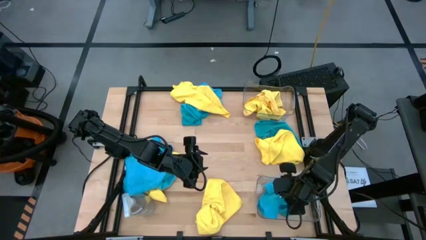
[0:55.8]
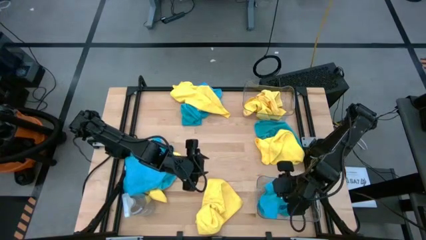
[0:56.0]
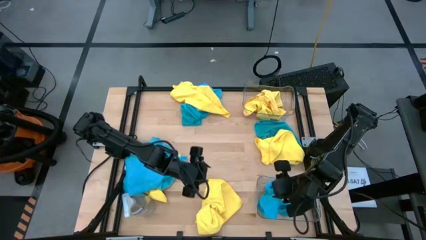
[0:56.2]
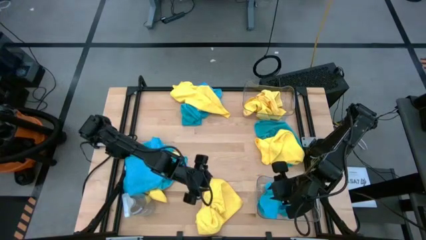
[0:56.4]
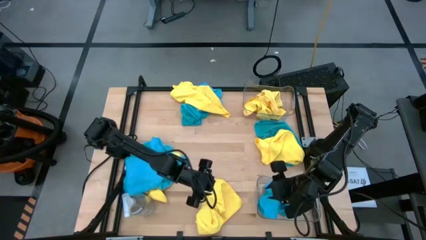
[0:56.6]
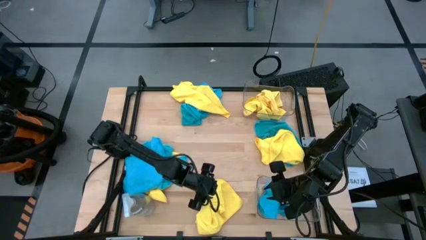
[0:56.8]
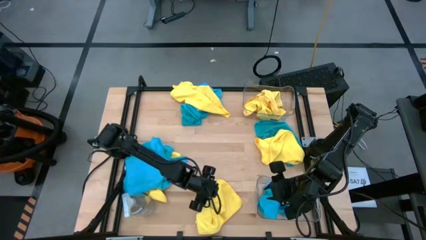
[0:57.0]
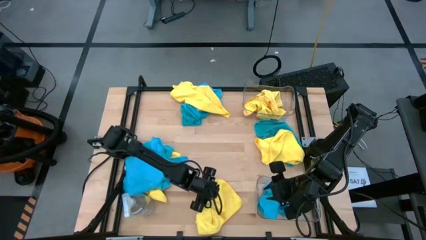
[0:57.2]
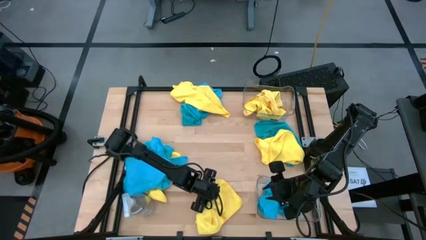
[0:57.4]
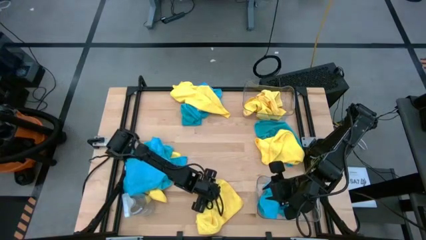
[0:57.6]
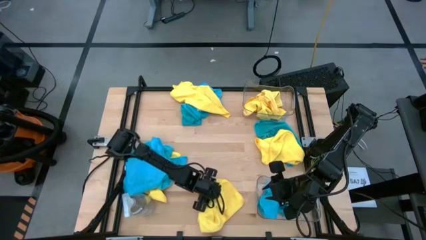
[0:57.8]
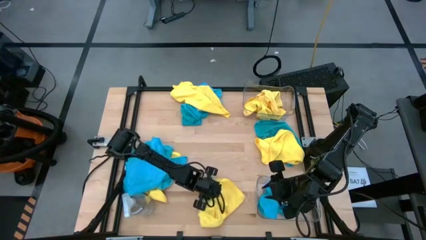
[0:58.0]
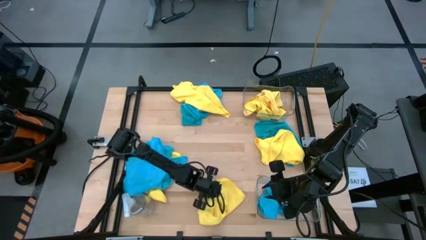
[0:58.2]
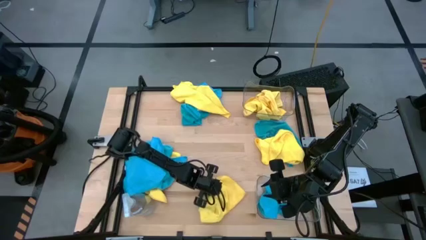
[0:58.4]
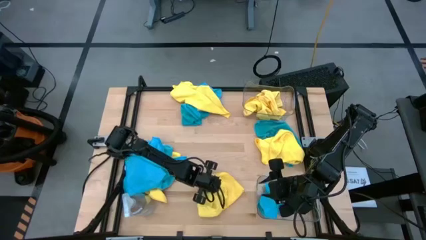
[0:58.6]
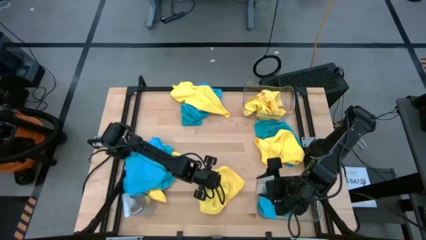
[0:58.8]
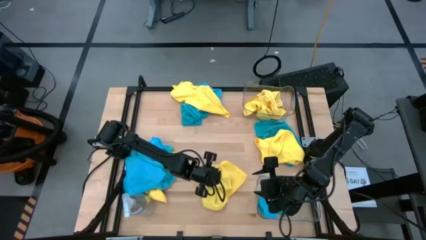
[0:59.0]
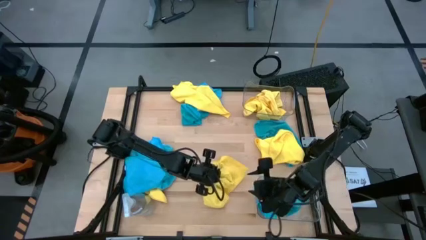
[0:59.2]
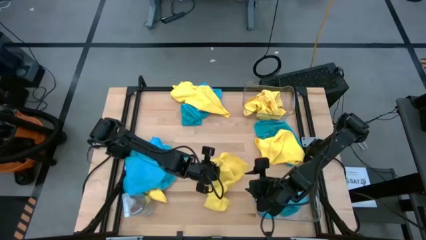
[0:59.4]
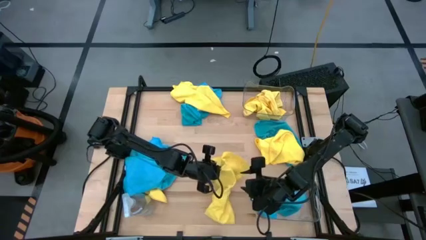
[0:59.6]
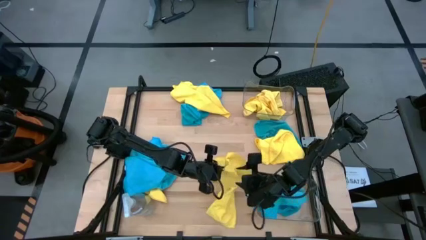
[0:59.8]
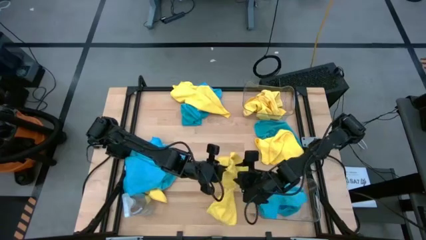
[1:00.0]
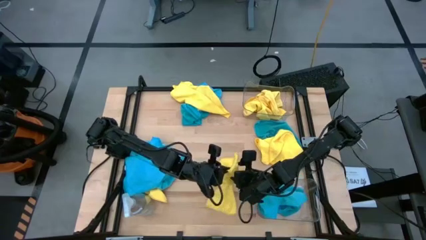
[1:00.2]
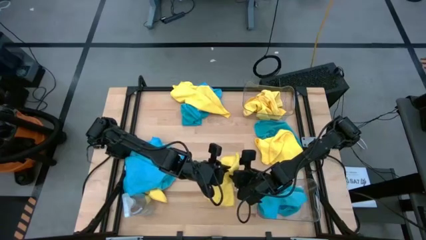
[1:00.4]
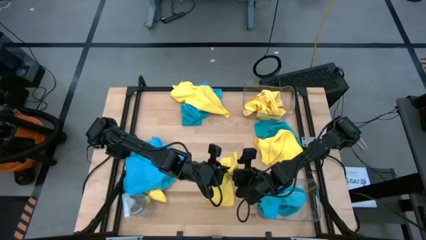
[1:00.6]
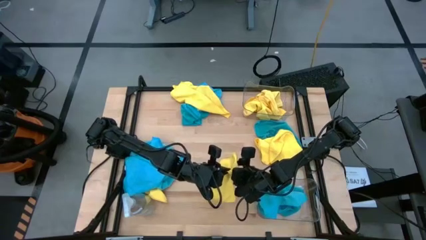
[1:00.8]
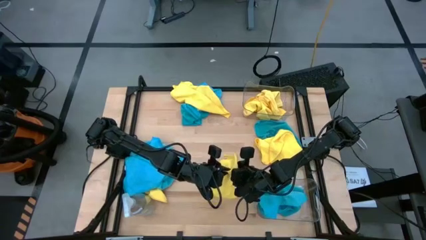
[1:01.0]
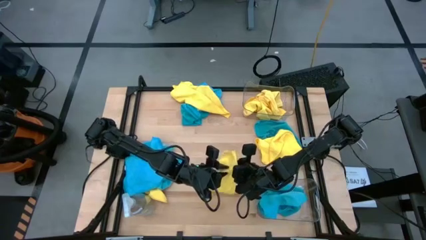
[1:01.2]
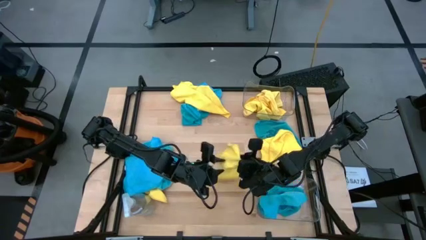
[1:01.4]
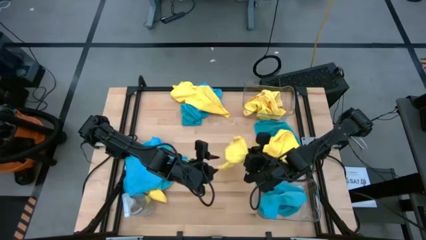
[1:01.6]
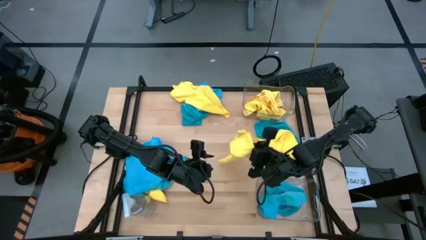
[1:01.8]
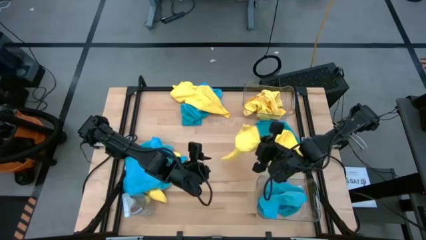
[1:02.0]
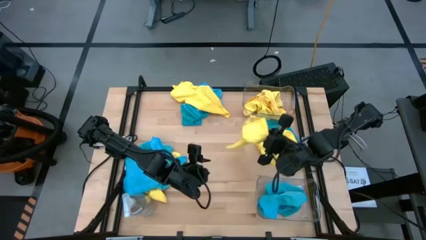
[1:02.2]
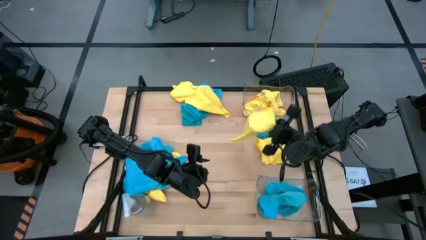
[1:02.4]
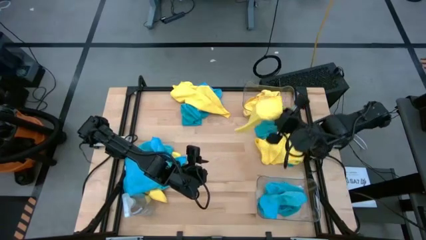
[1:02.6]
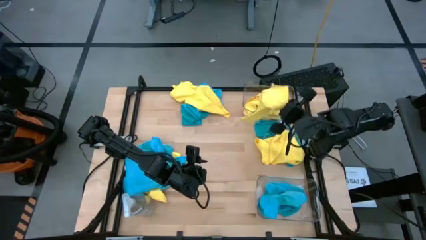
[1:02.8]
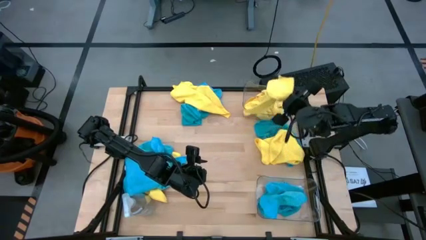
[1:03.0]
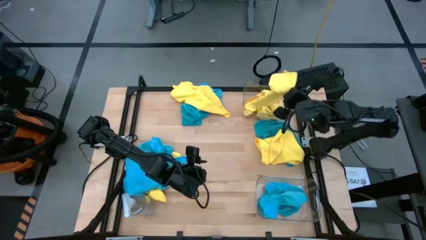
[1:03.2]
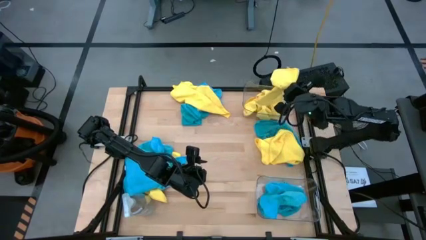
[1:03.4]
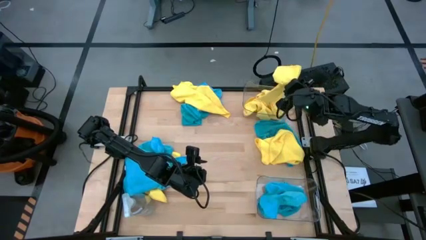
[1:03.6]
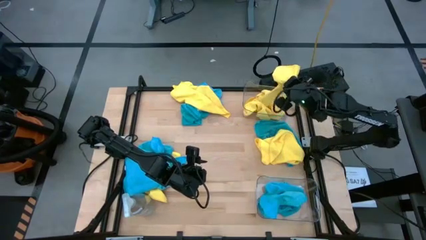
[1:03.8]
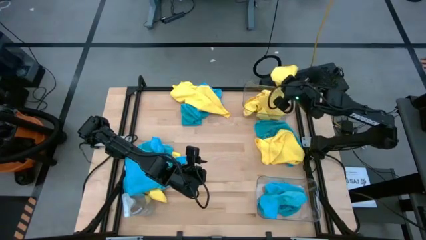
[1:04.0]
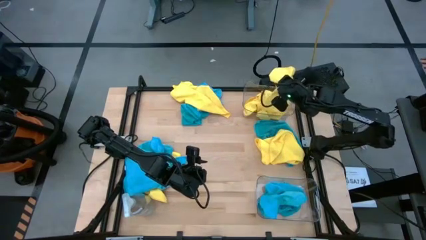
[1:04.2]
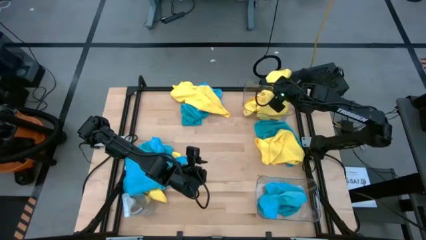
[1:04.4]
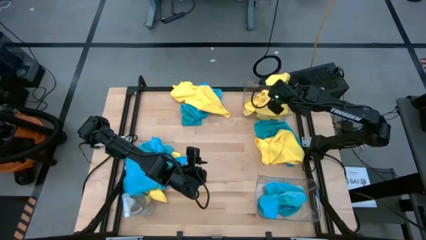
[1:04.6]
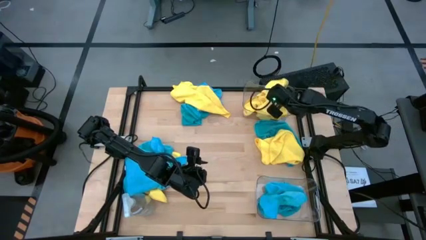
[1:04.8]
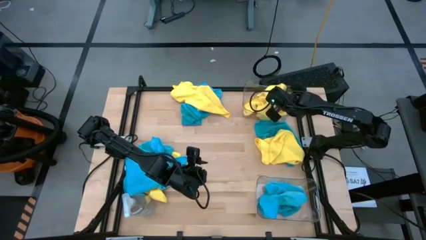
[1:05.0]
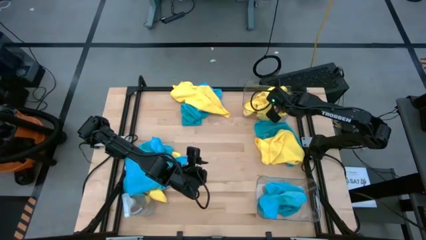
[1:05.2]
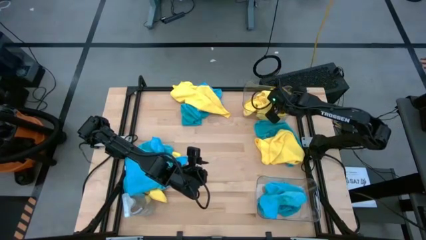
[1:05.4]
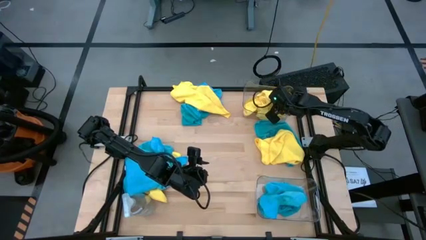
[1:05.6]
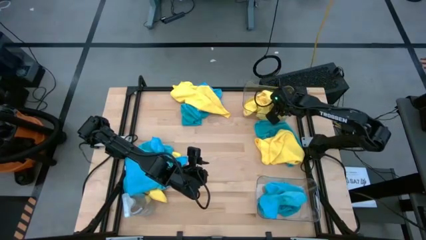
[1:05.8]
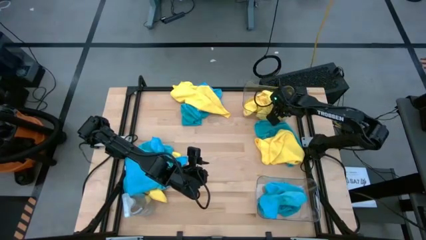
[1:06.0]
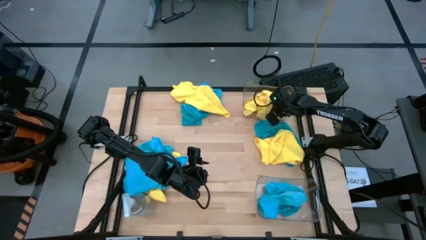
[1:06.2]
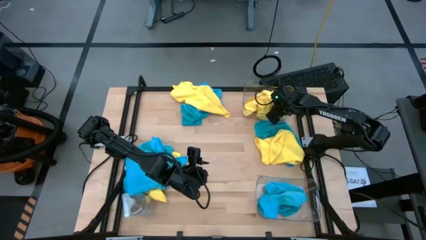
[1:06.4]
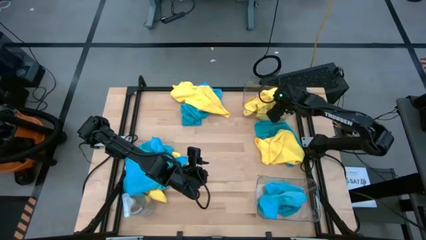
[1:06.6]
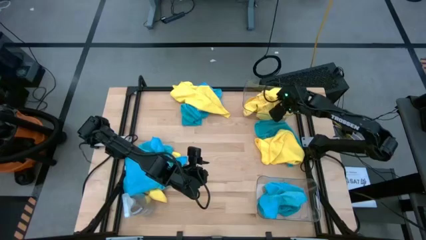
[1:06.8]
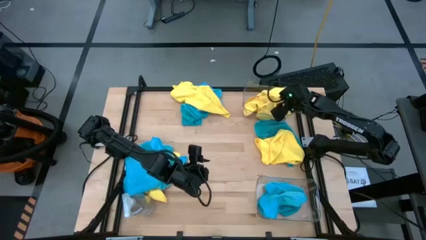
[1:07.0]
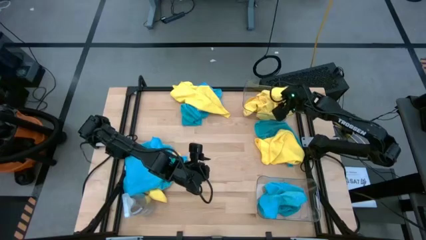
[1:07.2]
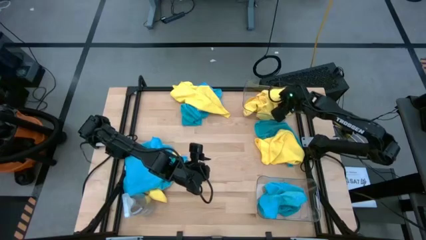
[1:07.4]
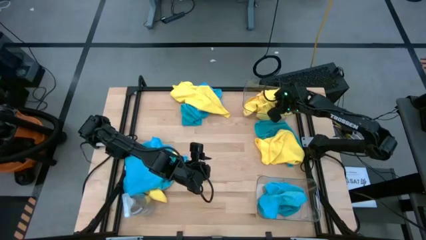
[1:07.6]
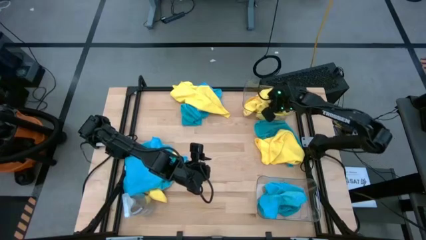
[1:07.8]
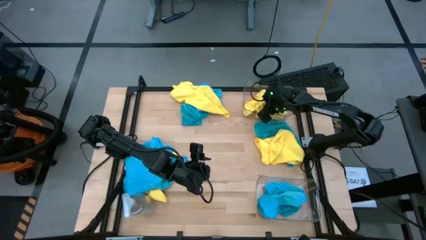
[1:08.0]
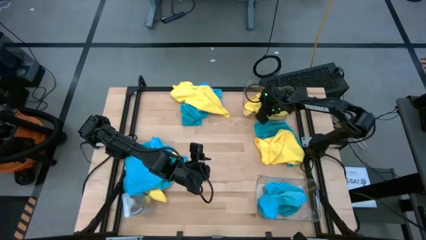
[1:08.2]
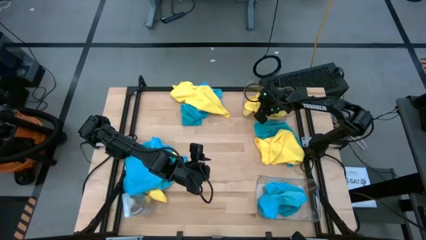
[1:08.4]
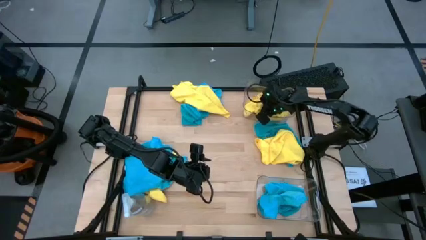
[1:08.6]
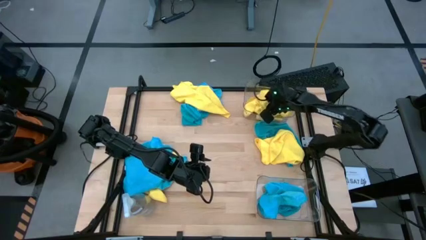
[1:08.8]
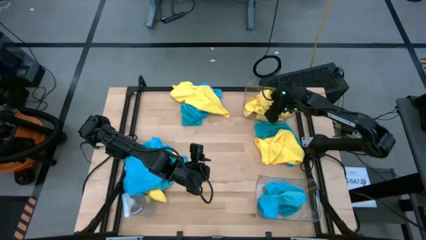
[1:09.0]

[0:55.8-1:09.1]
Task: Sort microfiber towel by color & place in baskets
Put the yellow microfiber cloth into the top transparent bin
